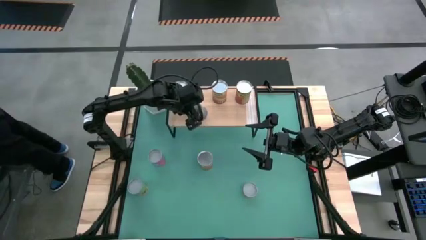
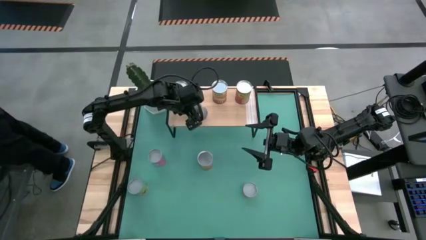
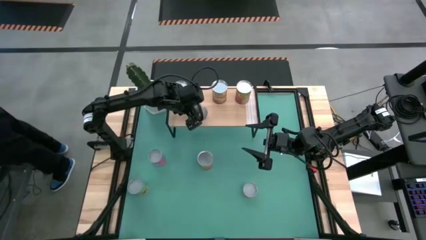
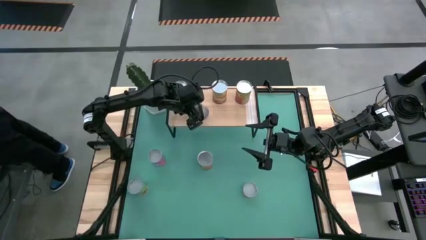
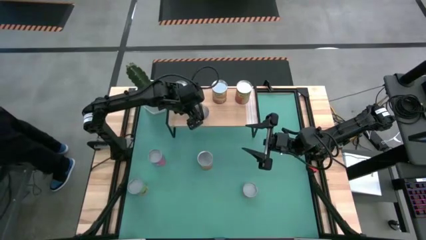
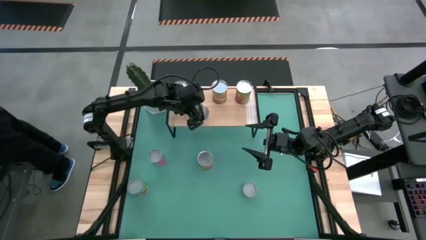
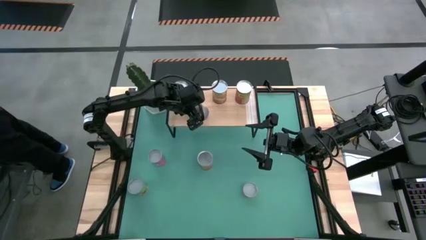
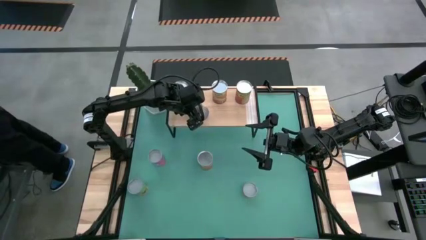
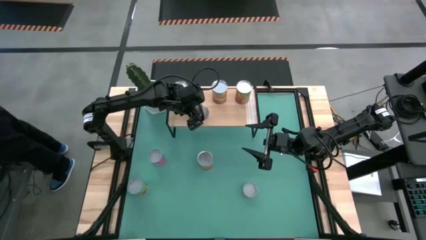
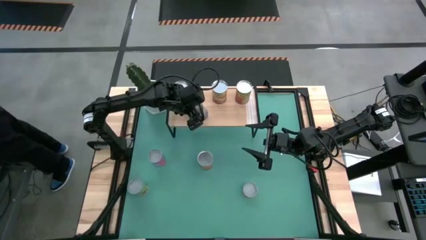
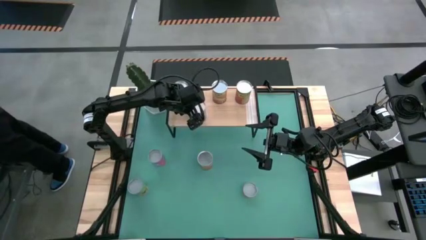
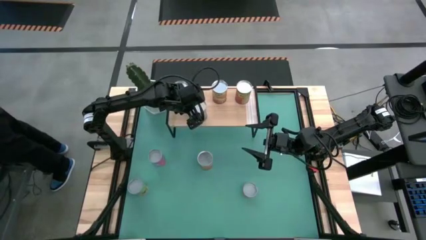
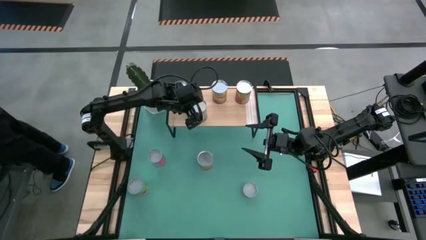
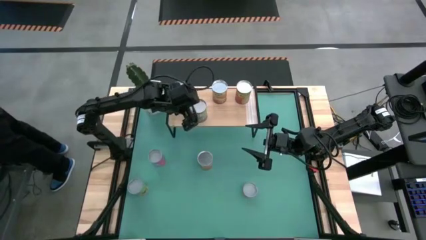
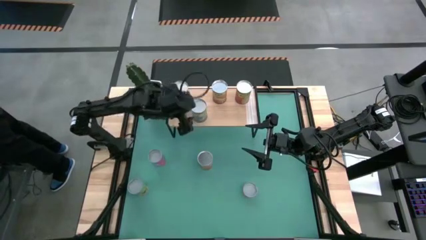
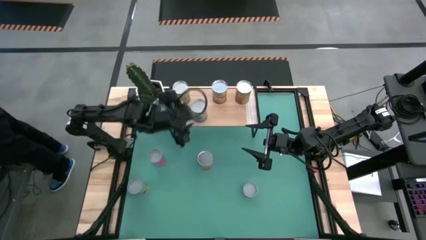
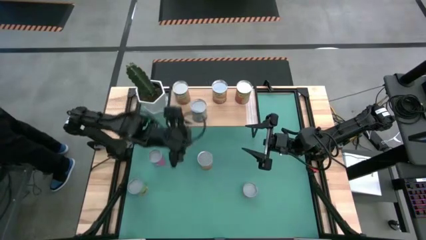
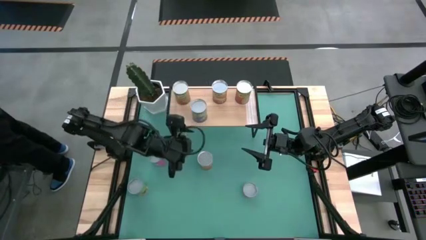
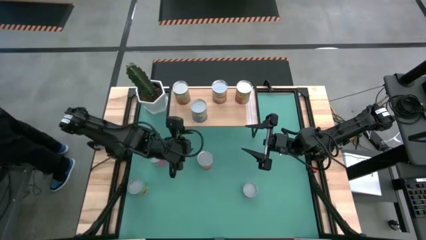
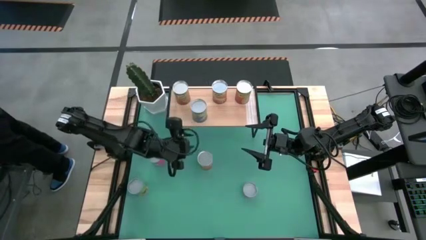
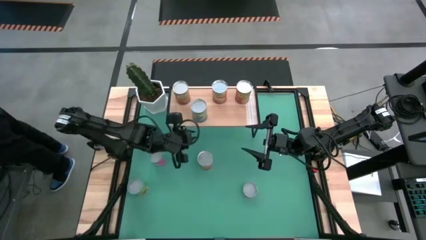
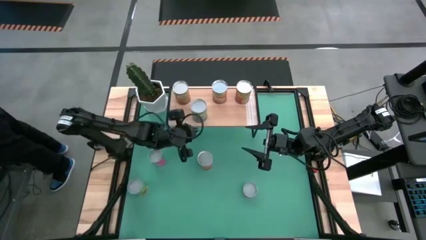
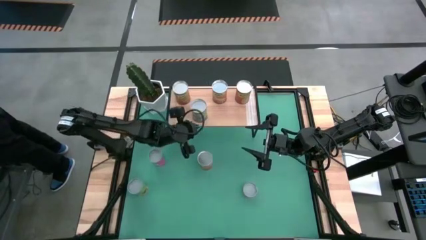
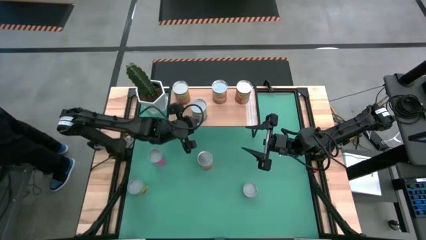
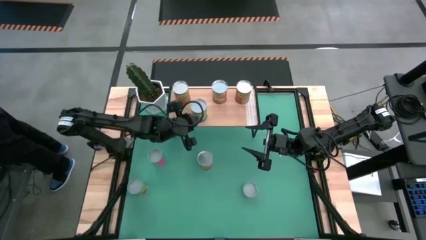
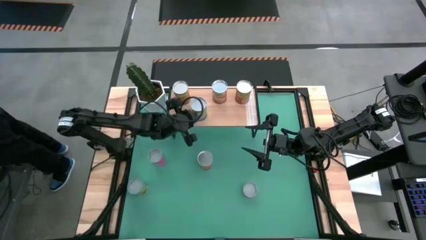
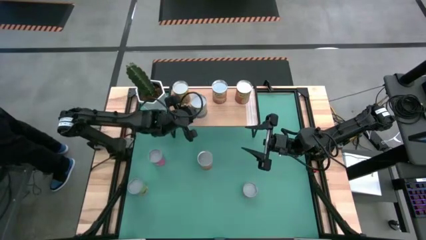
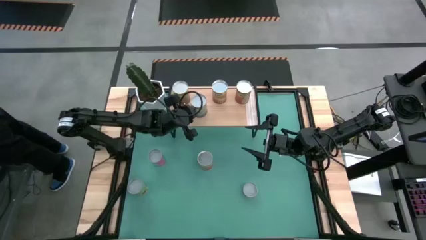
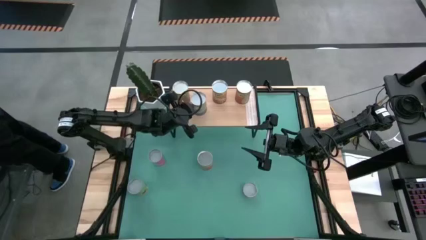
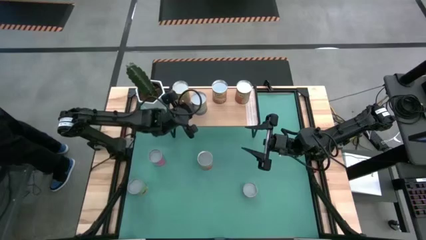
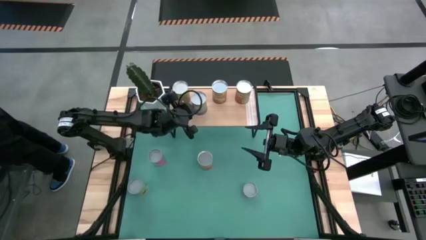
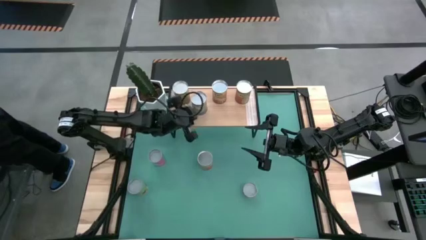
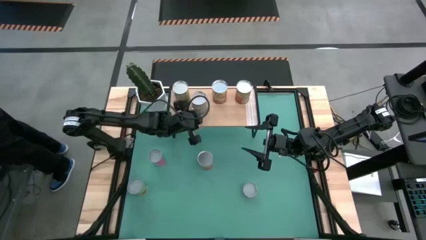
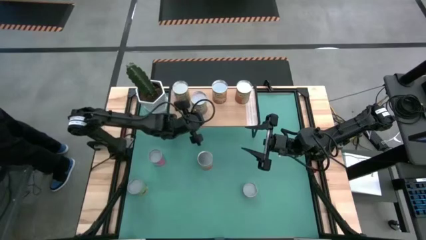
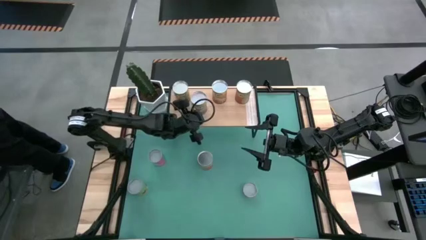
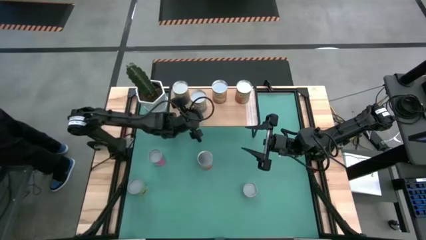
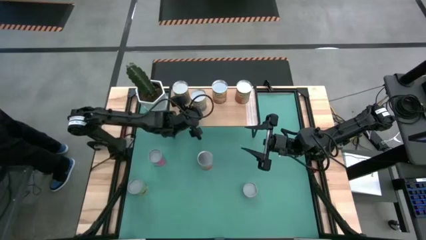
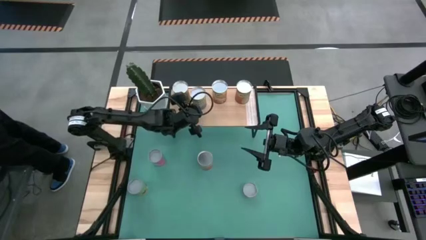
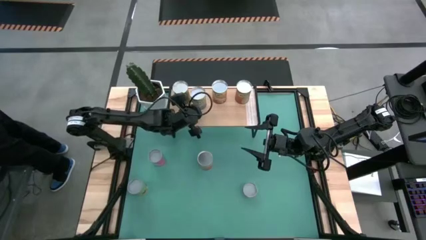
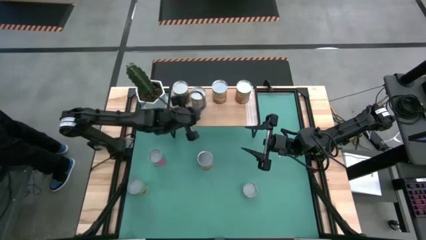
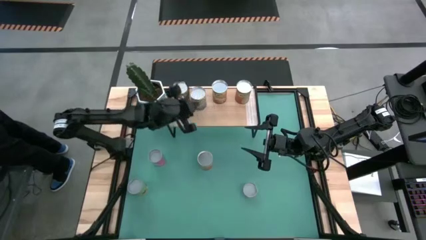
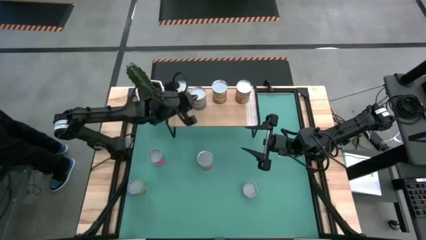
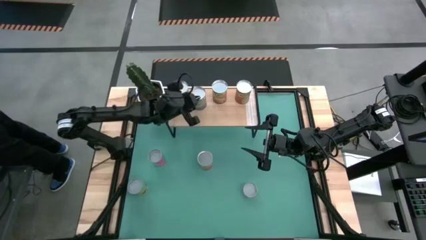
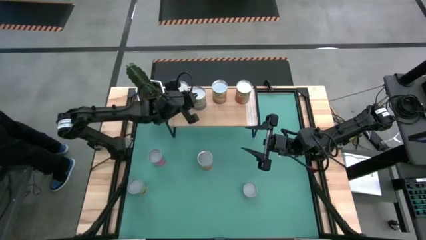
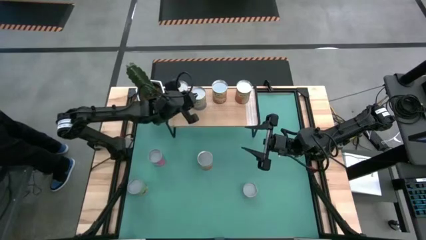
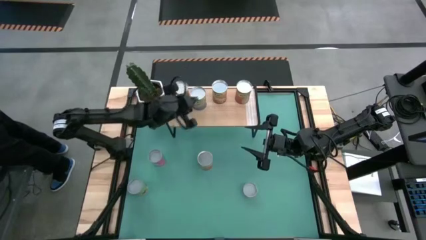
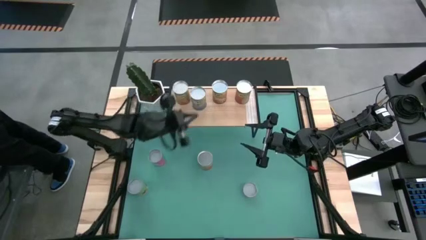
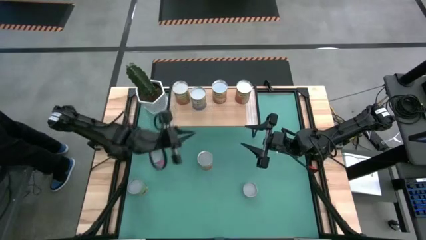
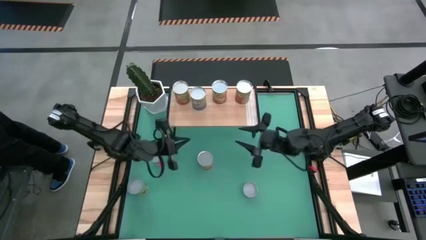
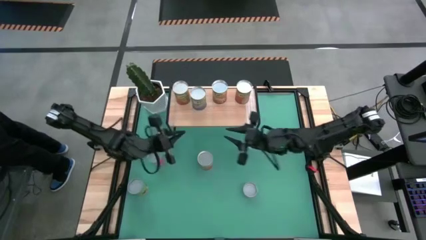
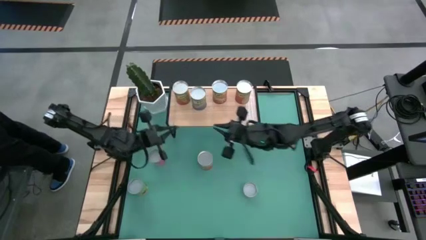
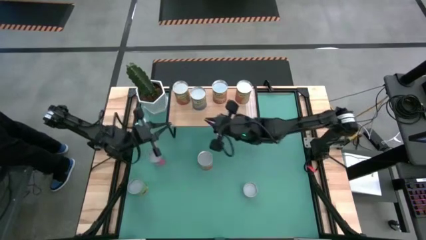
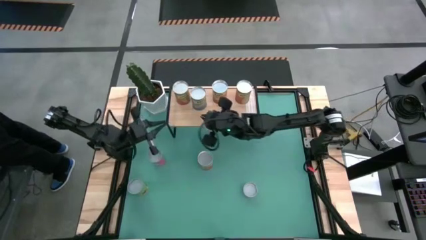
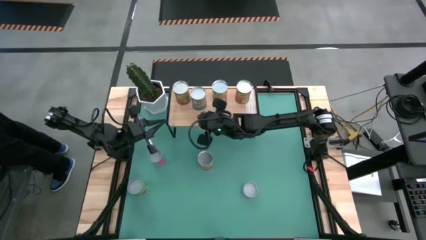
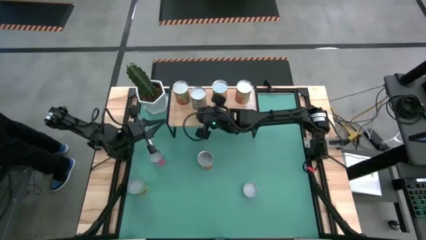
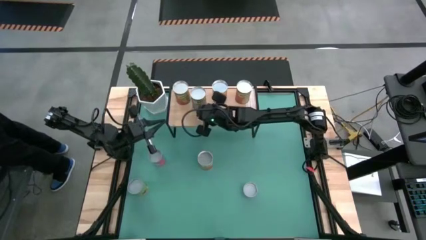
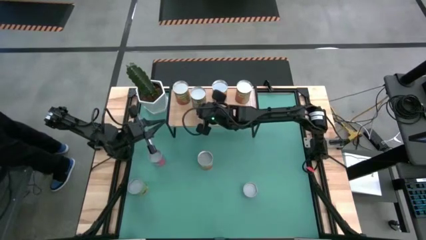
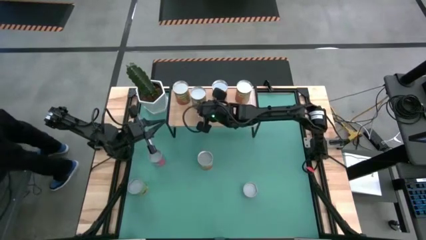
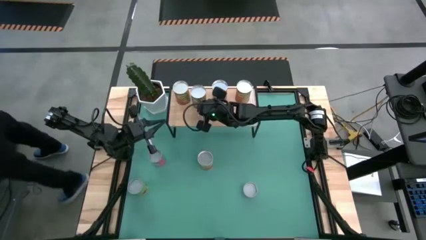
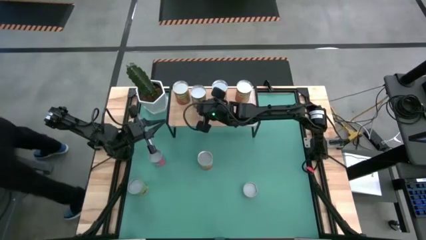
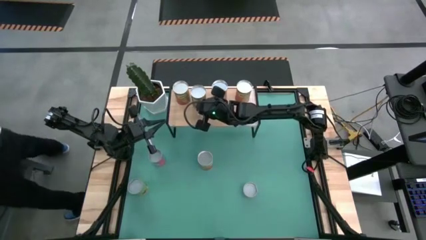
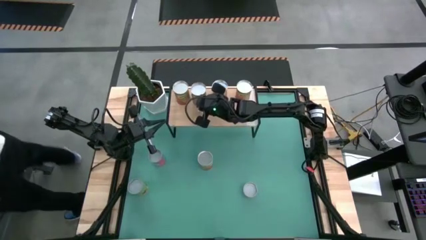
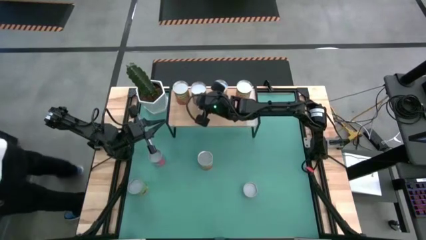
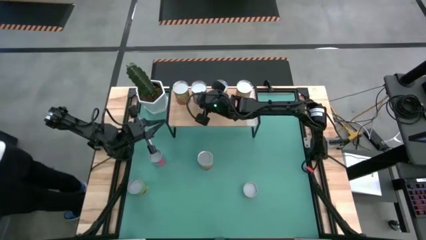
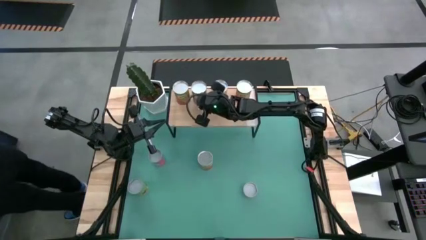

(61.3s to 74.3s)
Task: Pick and place cans onto a shelf
Put the canned peas on the shelf

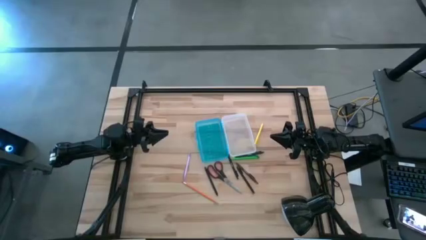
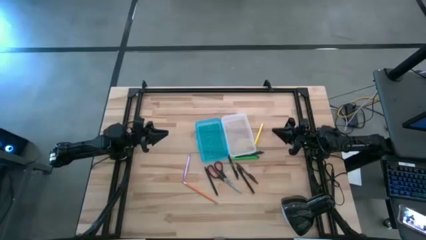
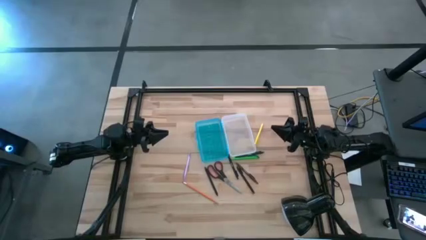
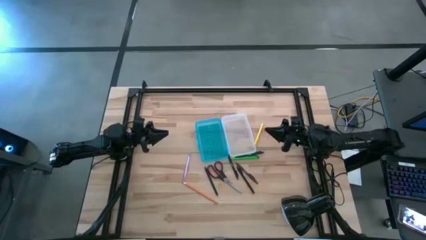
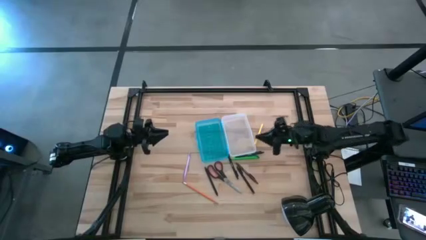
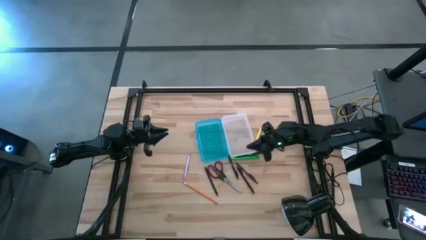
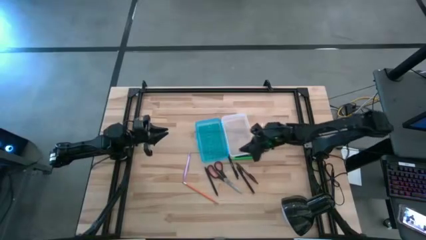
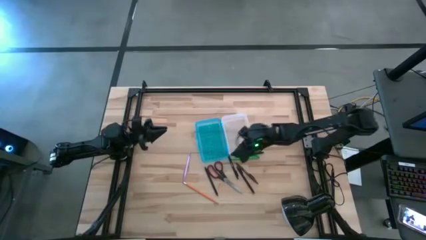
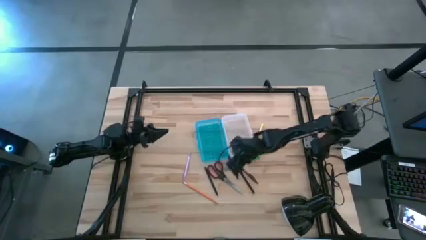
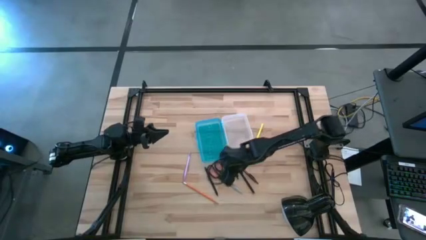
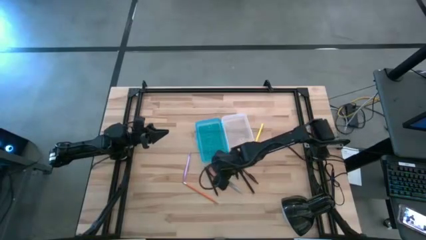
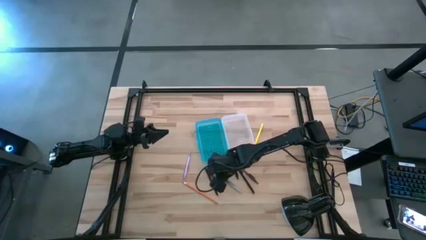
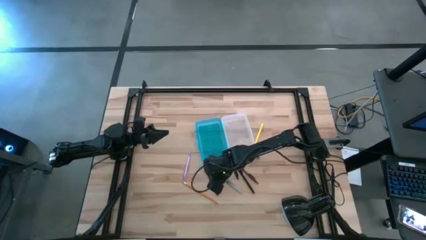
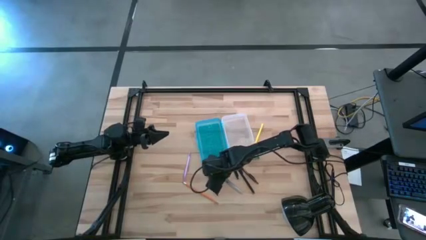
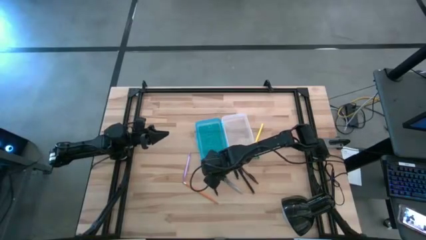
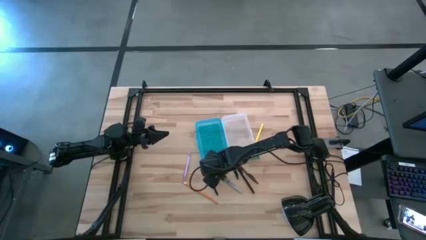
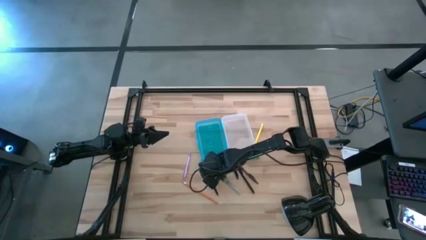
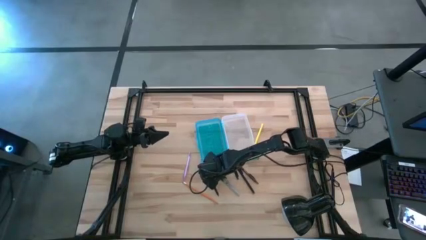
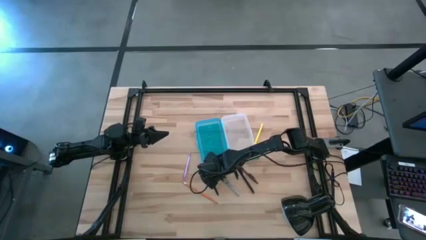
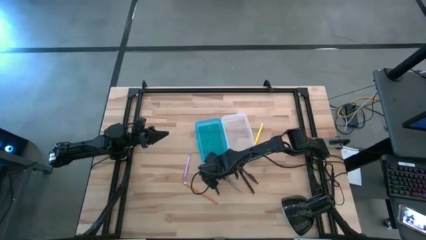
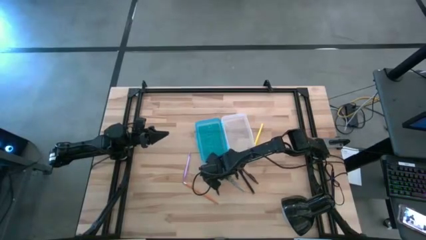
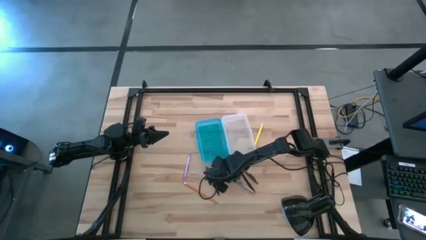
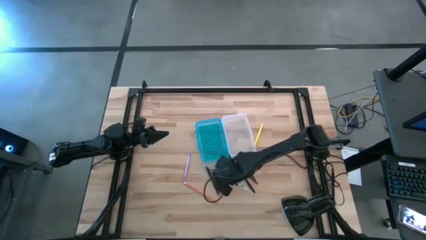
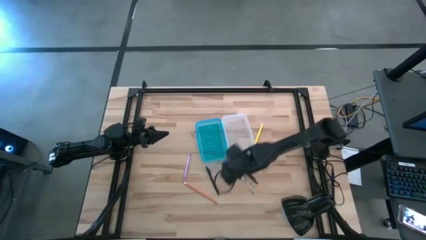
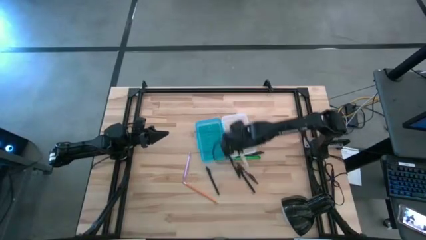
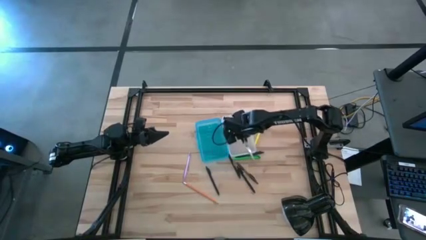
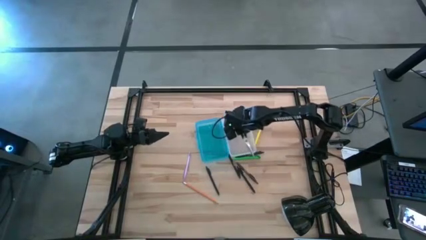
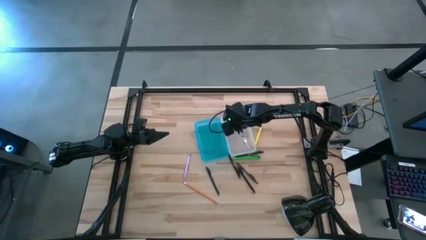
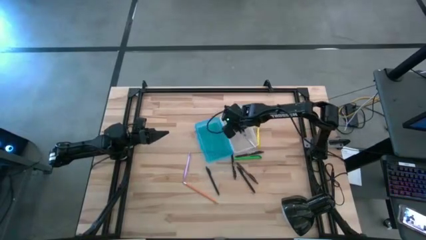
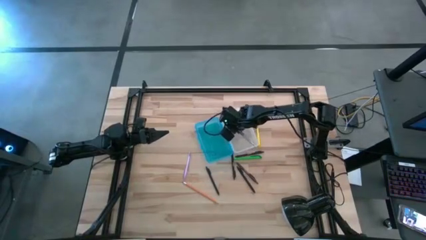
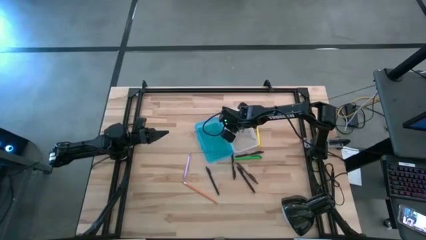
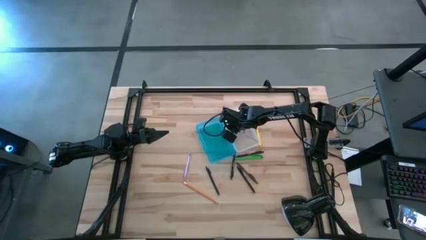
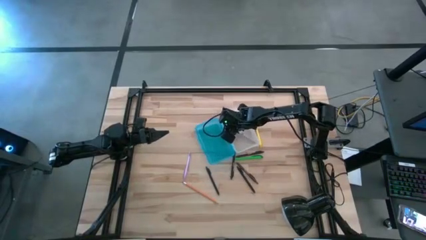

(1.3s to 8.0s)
Task: Pick & place school supplies into a supply box
Put the black scissor into the blue supply box
